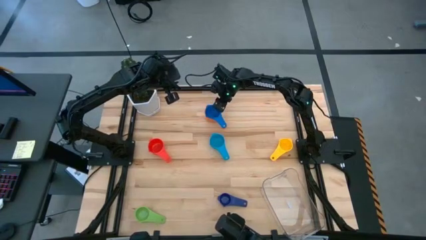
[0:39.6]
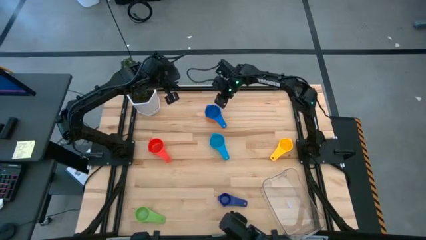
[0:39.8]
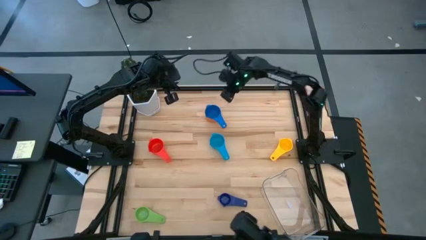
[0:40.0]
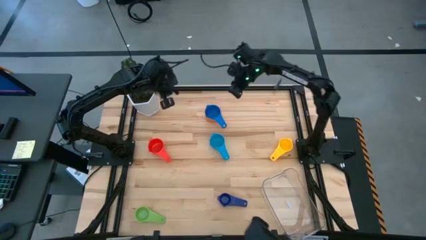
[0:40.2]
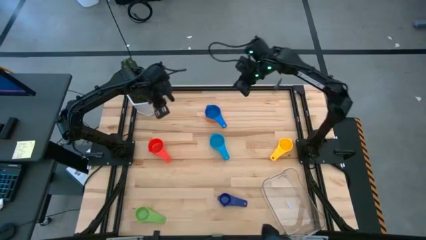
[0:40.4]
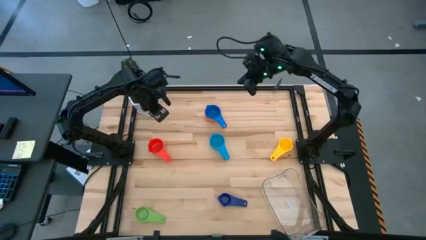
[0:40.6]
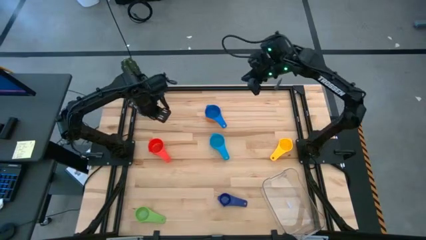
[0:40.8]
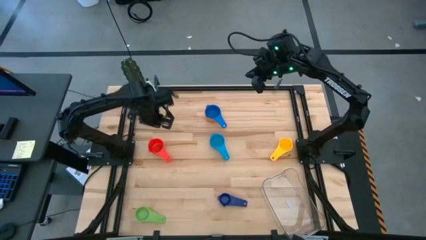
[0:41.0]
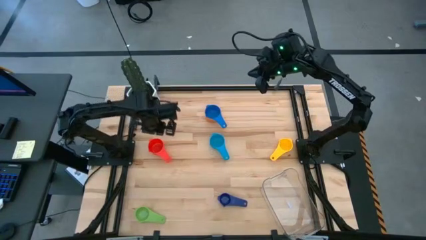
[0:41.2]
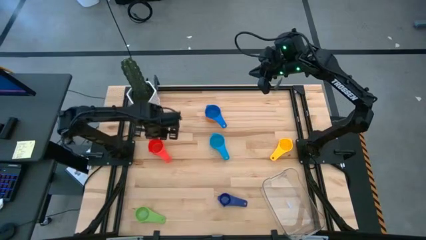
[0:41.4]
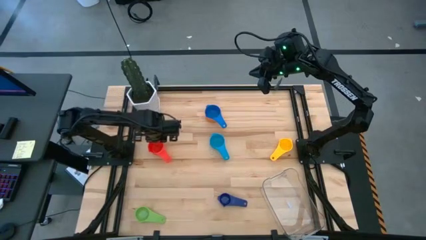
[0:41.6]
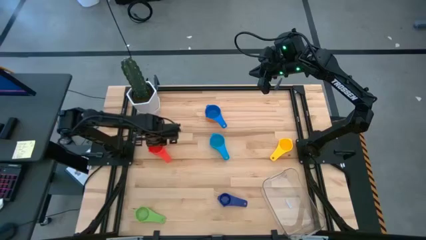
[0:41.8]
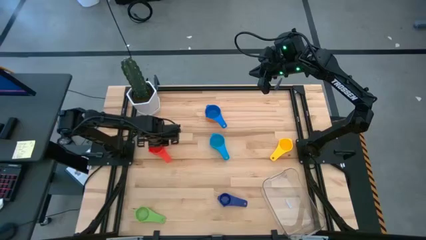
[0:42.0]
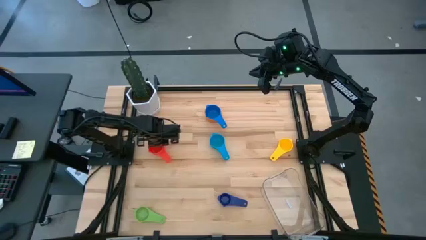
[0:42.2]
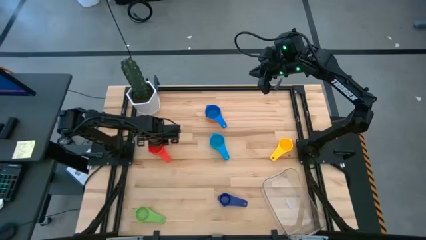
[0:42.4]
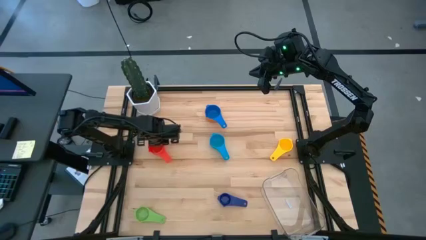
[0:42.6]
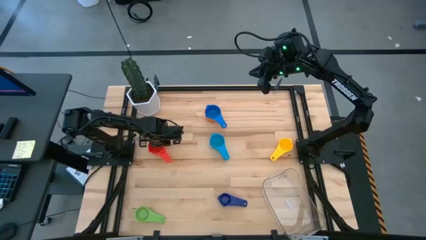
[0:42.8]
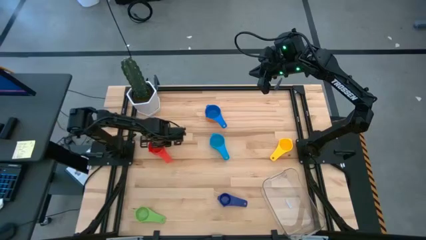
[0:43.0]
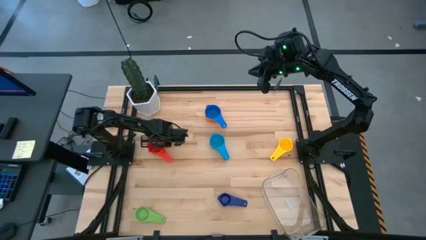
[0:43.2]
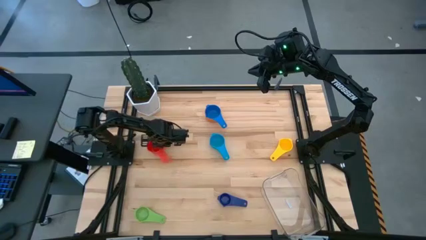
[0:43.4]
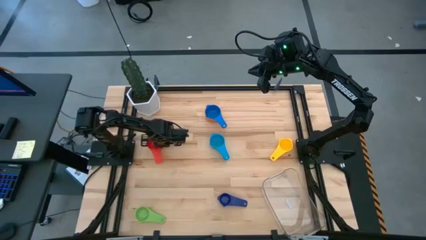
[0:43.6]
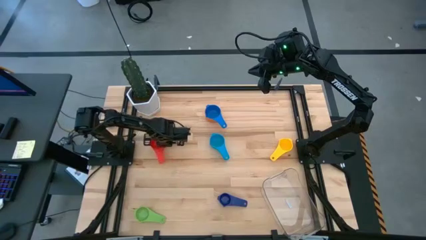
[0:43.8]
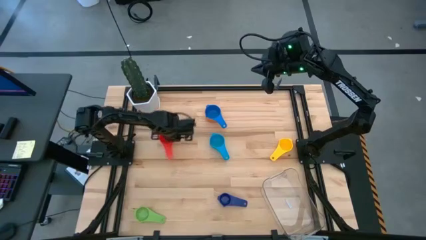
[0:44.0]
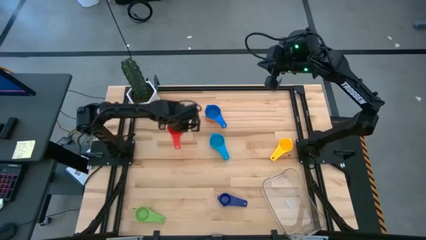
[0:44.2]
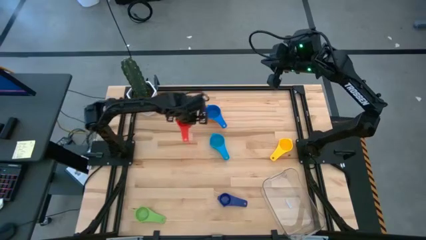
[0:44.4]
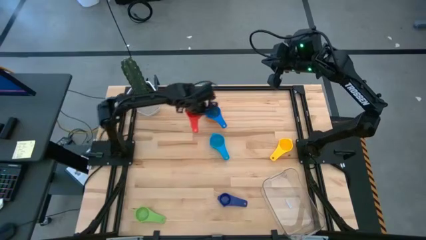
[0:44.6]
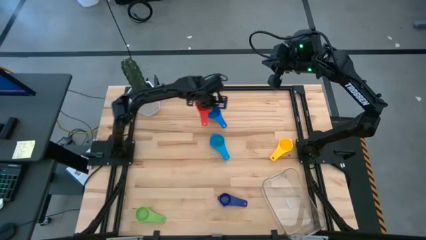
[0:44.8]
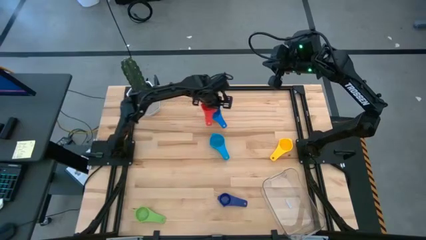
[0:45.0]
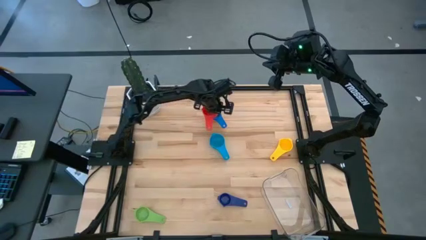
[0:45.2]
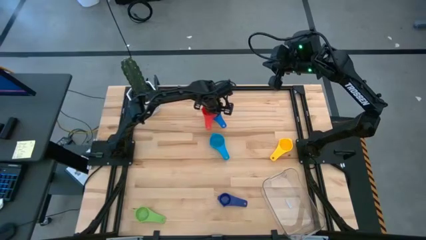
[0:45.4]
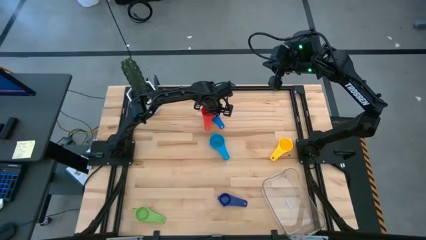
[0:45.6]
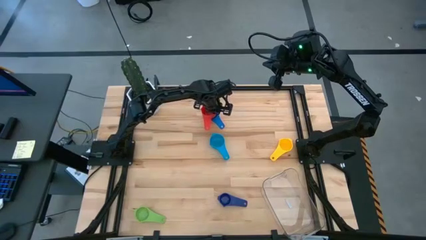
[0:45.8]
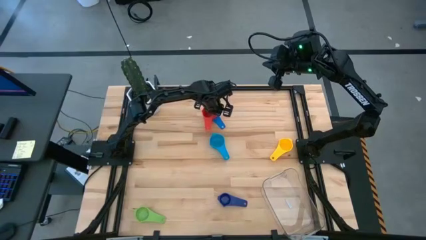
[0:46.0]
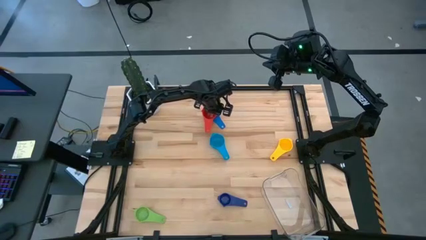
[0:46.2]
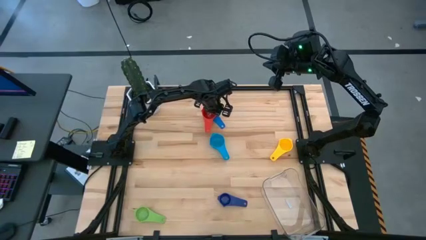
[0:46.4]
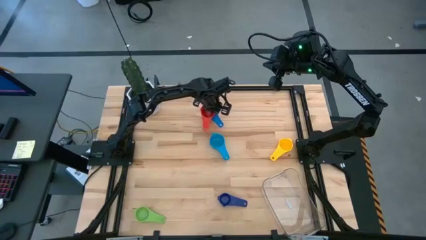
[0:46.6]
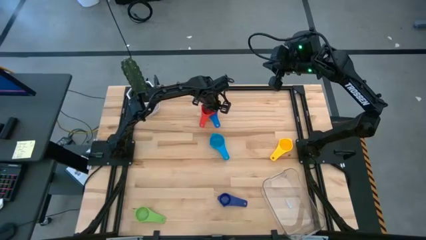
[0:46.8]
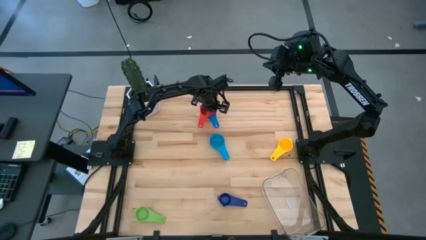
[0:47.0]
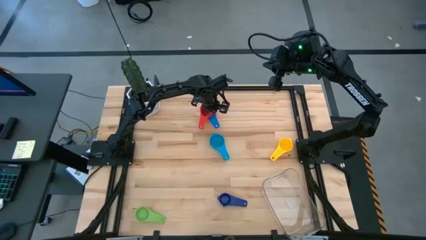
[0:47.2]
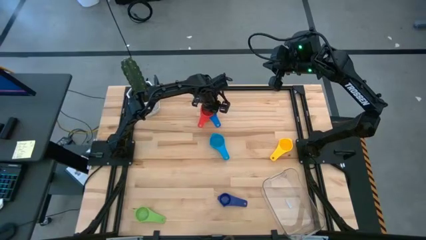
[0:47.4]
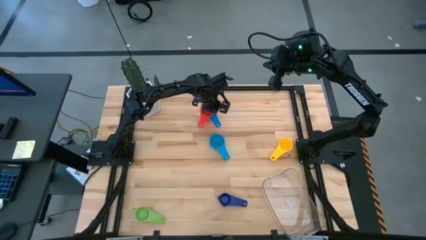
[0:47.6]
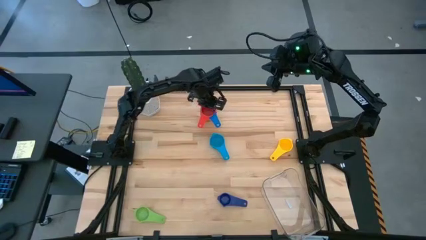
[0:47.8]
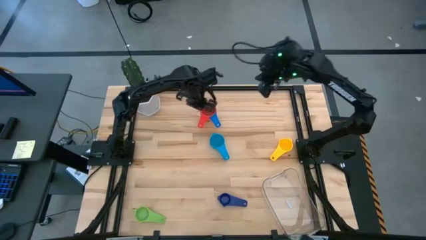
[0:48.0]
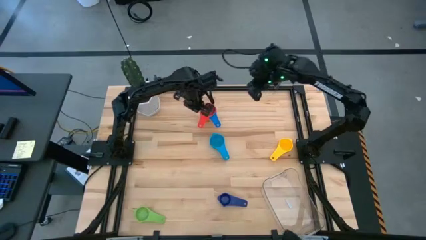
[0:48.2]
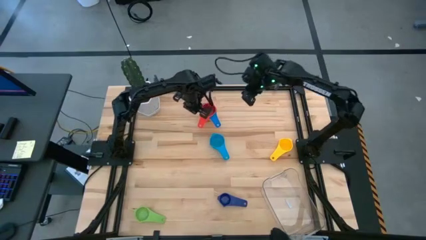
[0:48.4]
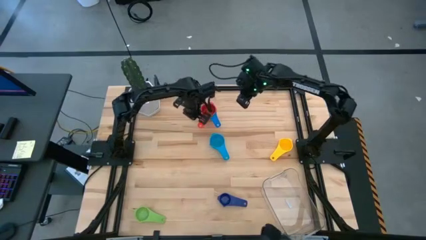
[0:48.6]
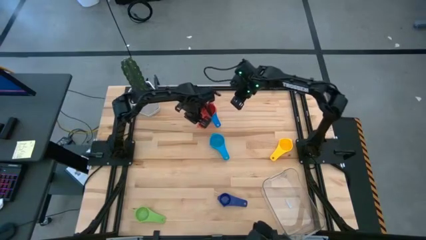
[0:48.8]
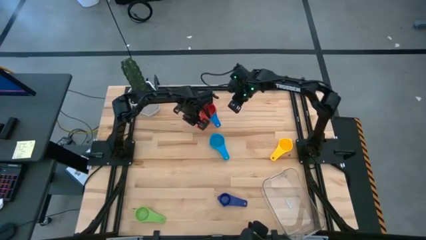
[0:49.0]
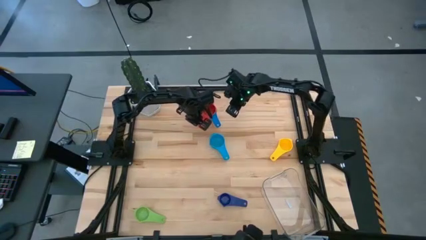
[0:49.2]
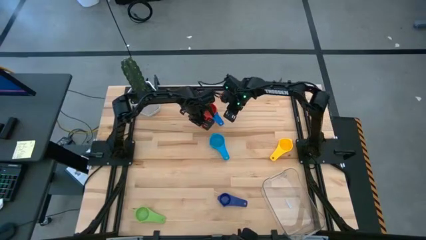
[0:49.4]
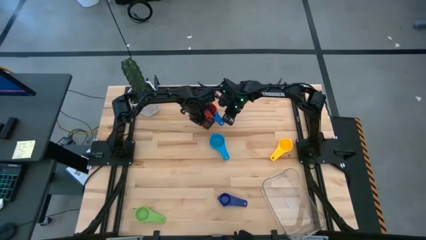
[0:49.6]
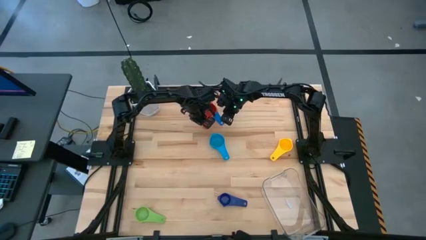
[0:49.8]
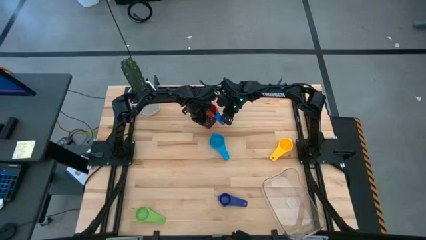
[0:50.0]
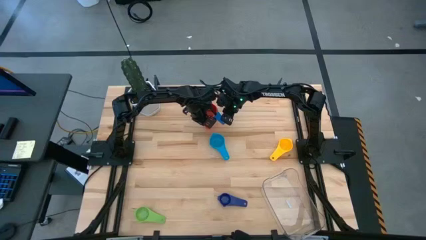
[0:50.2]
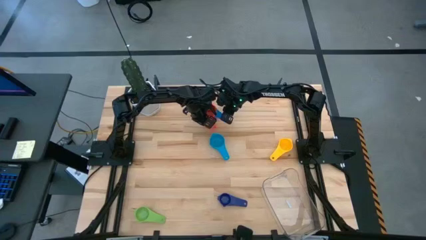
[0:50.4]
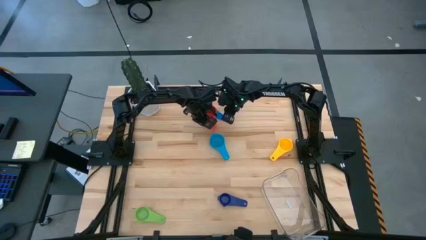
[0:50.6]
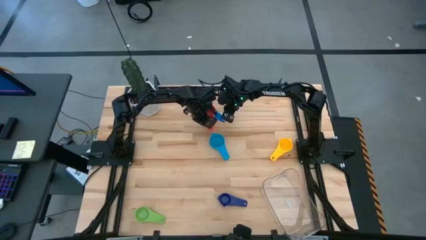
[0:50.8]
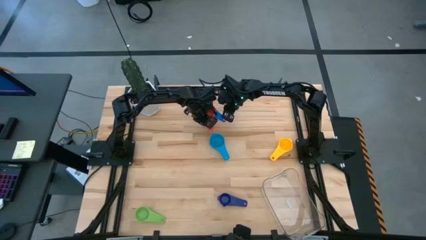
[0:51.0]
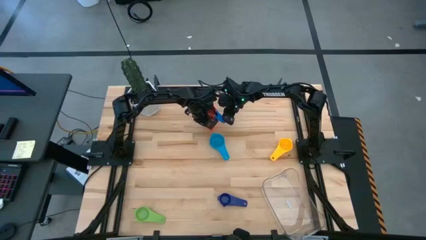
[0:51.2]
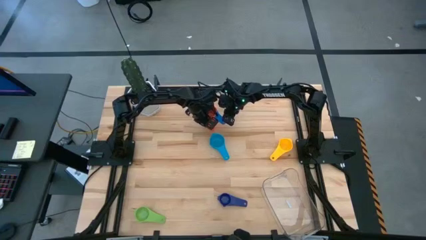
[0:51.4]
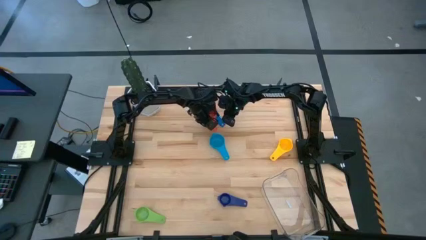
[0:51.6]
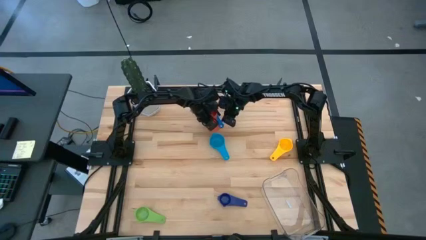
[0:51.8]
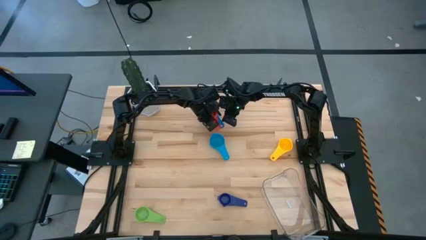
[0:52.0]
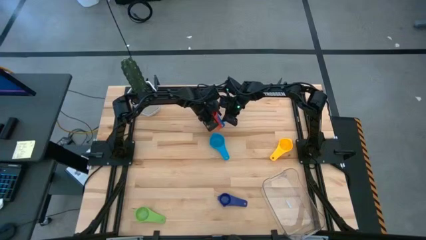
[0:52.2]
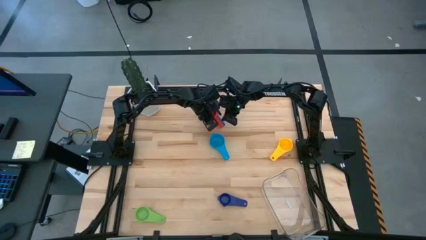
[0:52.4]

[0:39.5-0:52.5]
Task: Nest measuring cups in basket
Stack the red measuring cup on top of the blue measuring cup
